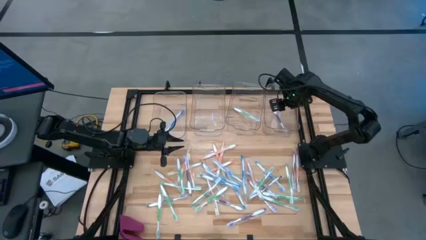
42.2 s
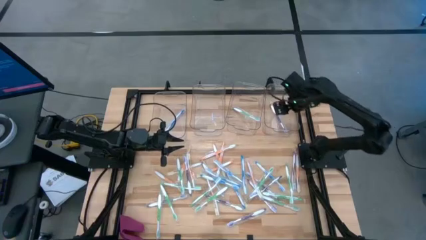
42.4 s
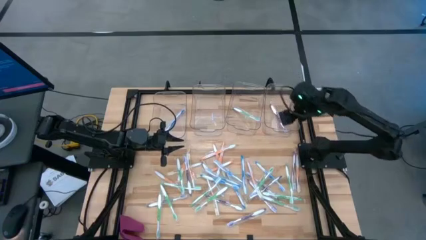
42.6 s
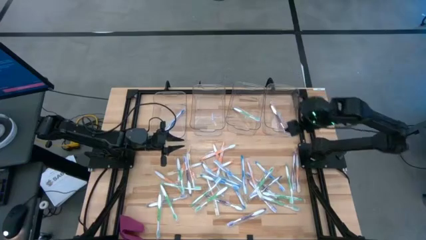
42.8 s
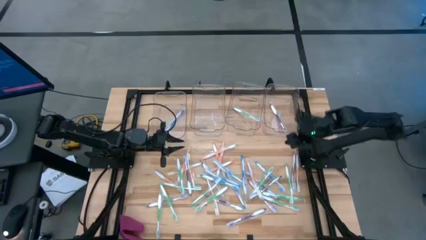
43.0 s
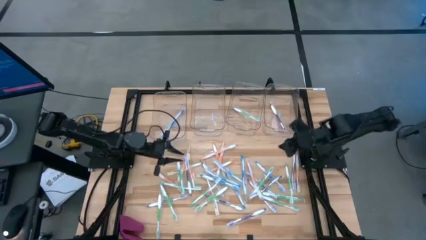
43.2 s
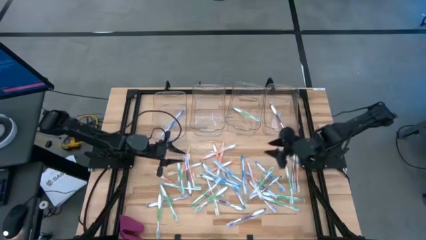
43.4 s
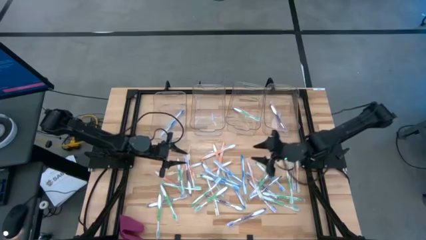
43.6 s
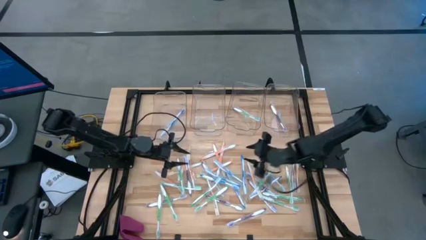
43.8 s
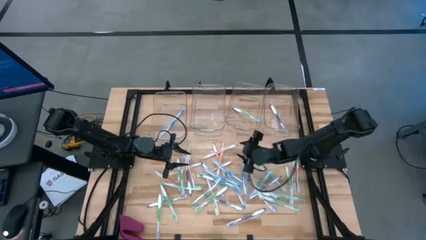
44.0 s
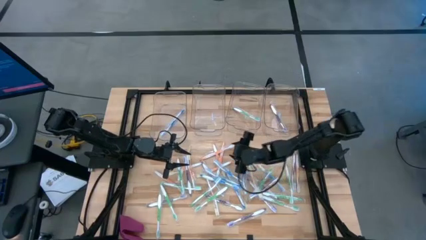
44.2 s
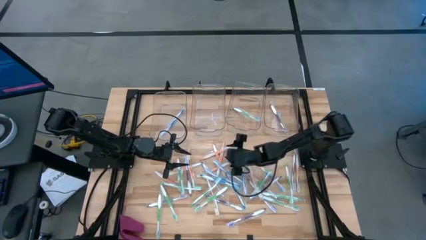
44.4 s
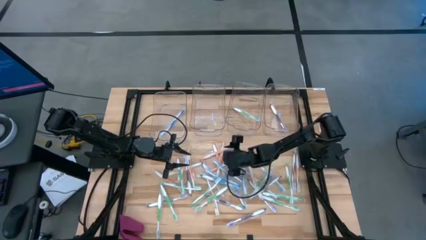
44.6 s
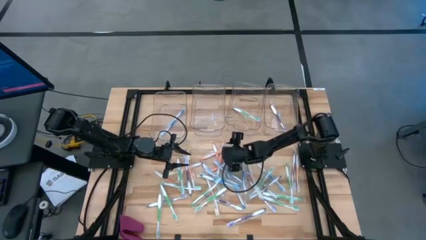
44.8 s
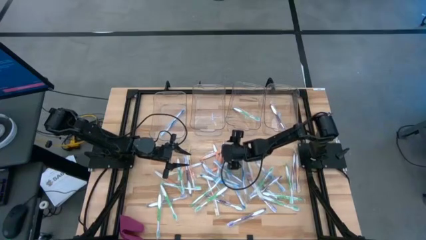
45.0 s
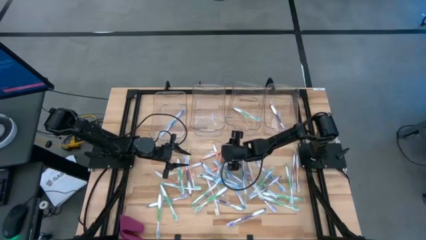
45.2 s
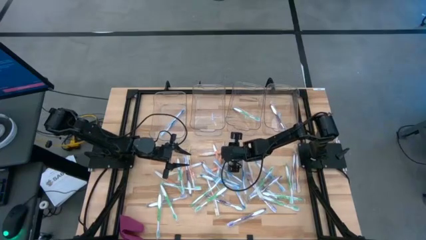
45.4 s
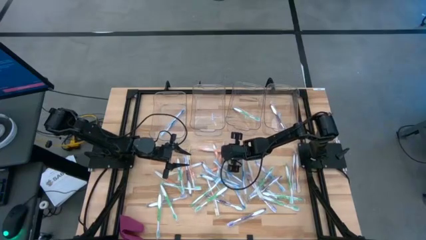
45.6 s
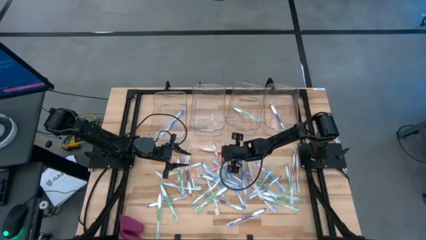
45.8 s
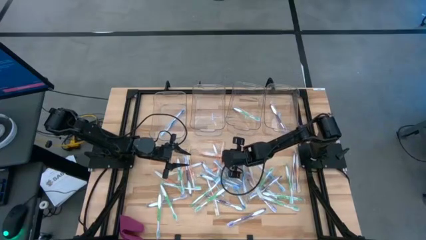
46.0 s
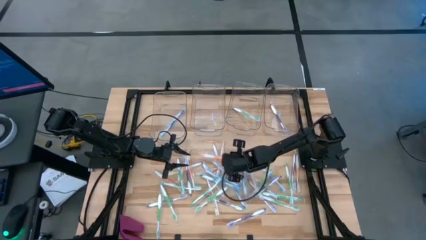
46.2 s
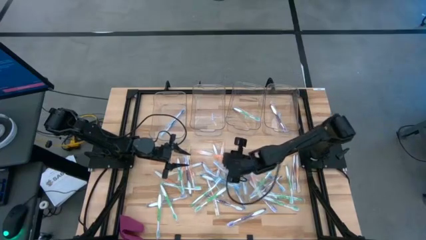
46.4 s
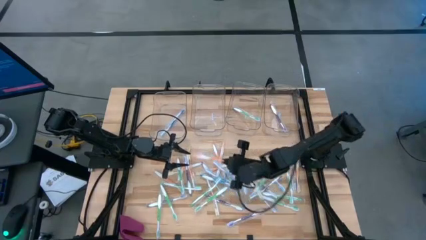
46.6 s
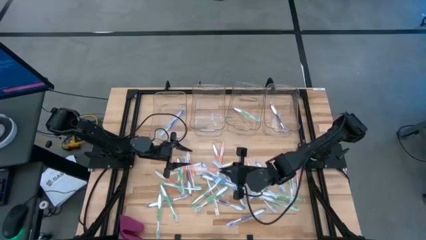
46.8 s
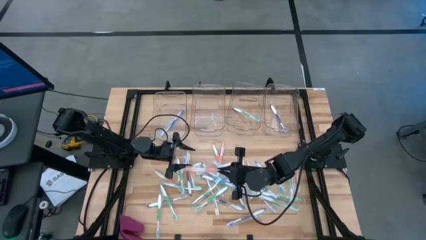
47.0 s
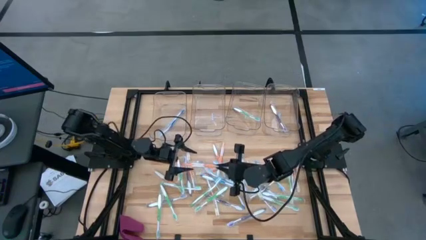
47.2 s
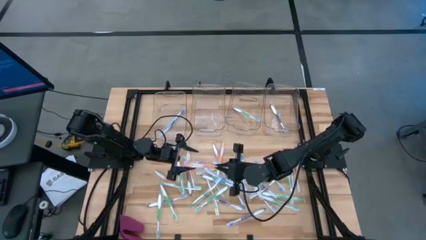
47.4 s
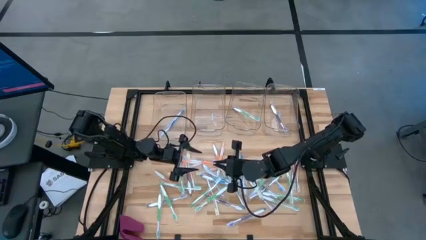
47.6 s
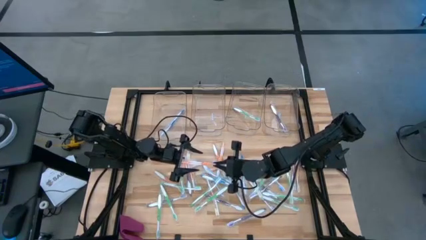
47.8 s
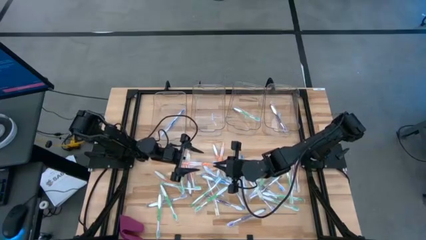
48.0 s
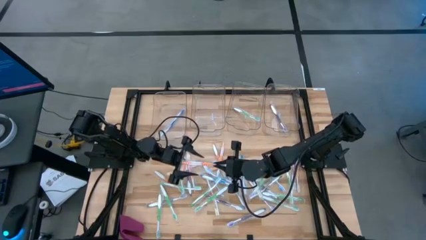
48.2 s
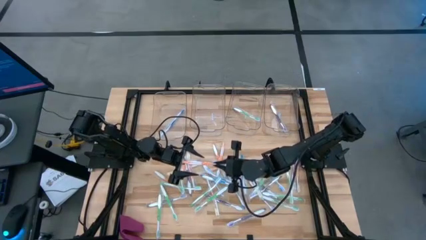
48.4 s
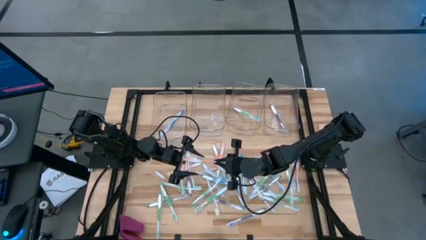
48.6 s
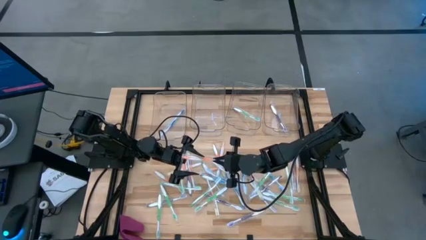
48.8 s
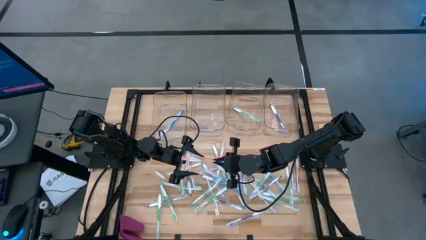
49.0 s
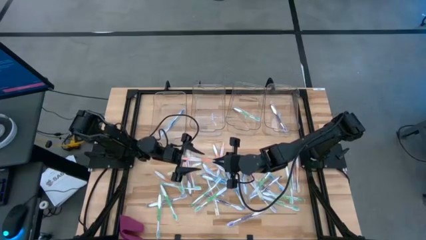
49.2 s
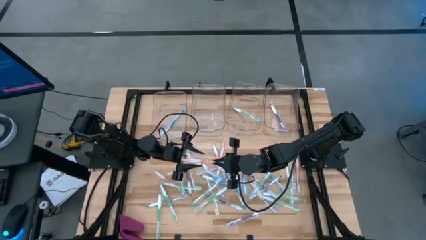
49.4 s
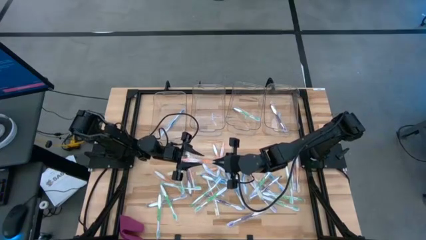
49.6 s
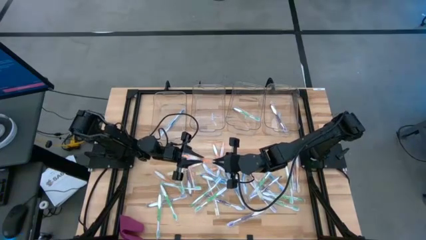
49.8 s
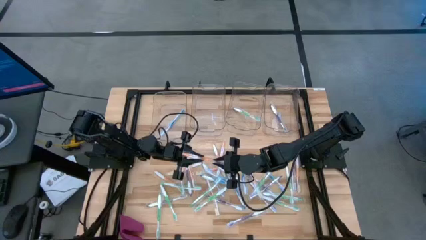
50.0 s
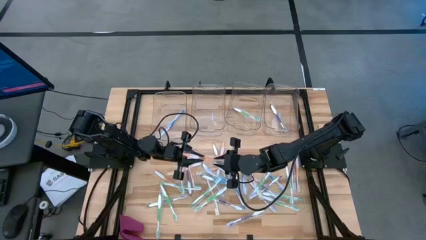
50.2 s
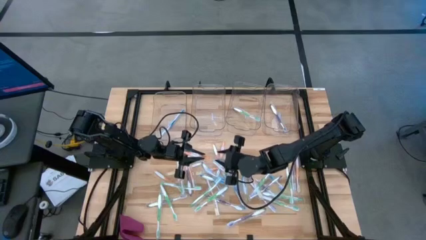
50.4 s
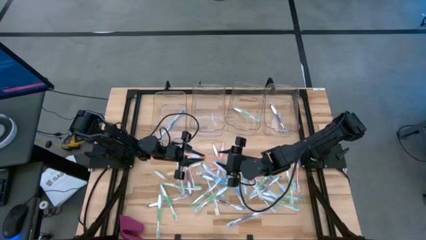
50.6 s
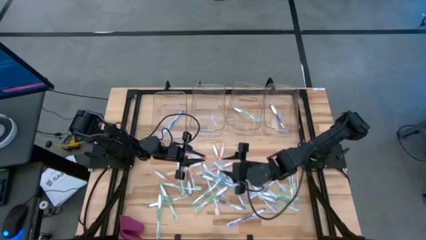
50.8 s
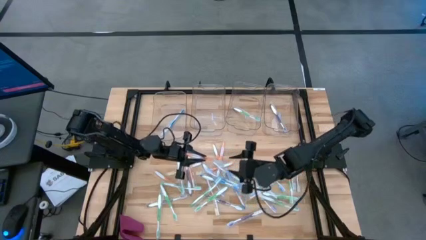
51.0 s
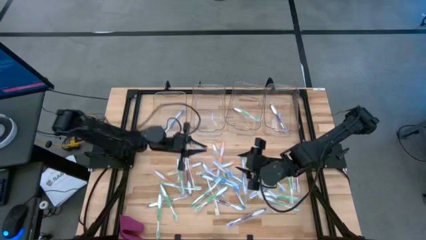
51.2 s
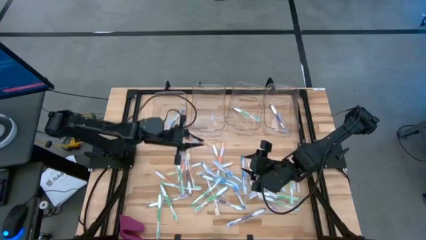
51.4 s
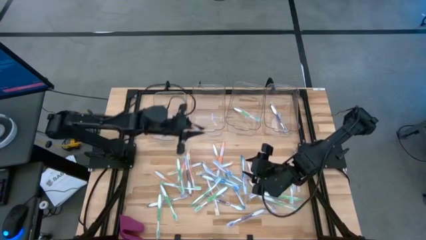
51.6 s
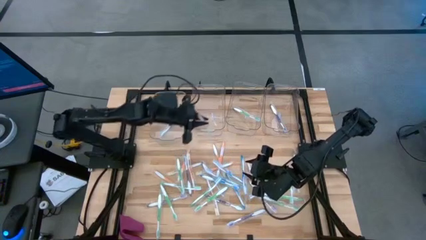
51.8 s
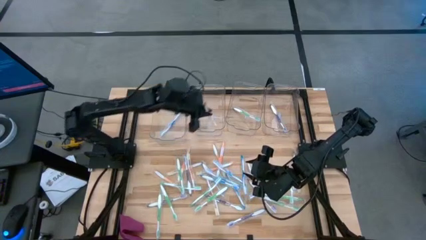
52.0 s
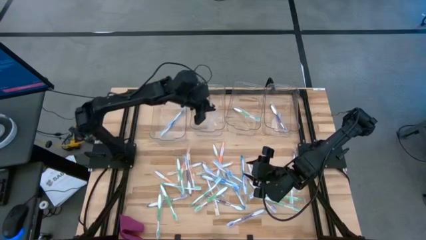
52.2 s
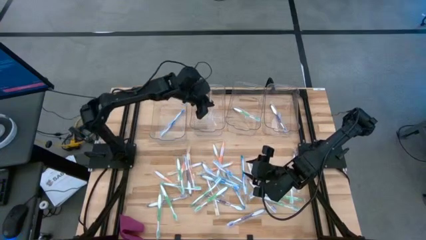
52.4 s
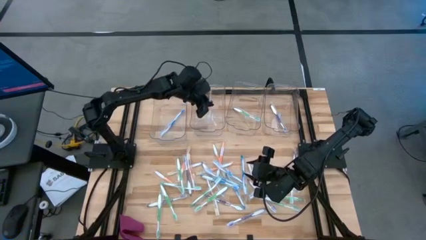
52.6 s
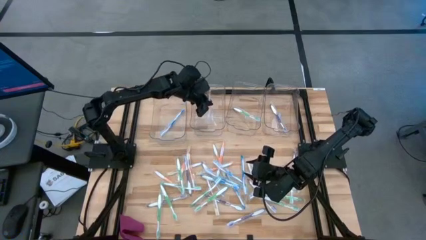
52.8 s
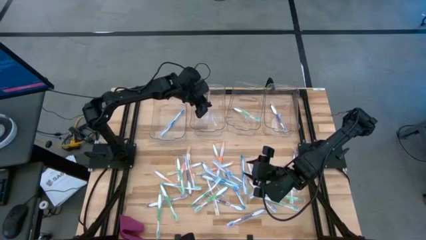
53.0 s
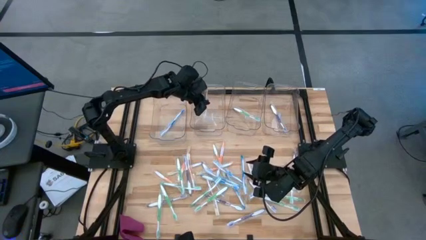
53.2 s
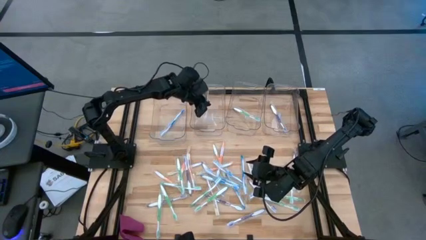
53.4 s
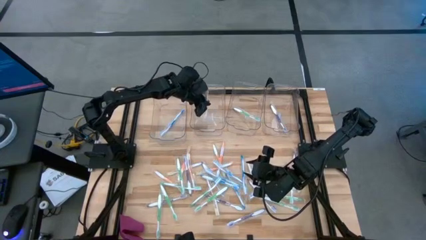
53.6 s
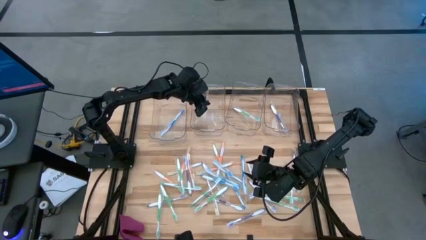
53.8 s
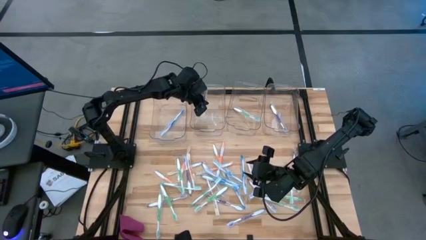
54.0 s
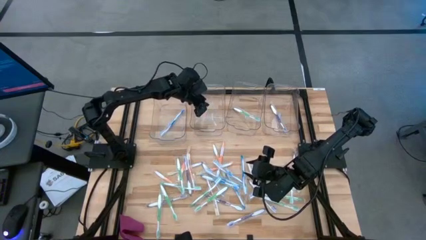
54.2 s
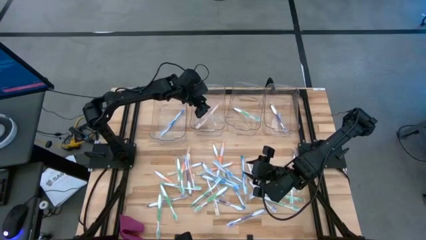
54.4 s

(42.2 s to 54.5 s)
Task: Pick & Place Toothbrushes
Put the orange toothbrush into the middle left transparent bin

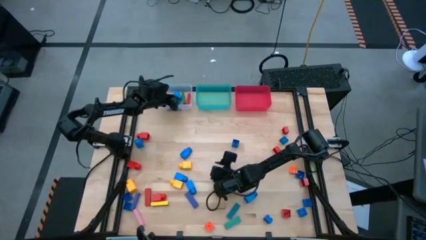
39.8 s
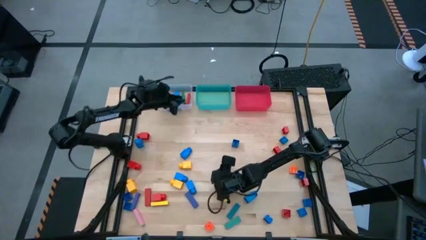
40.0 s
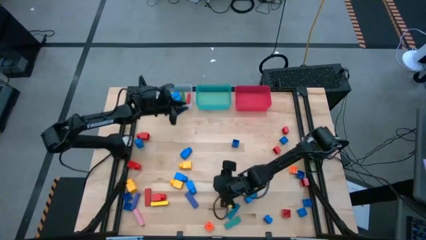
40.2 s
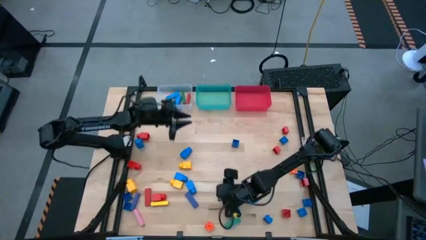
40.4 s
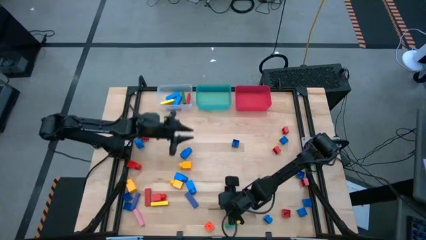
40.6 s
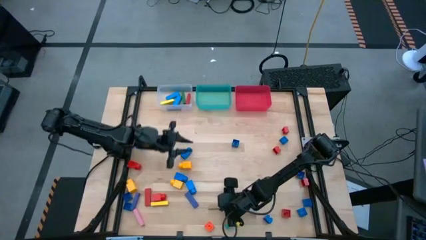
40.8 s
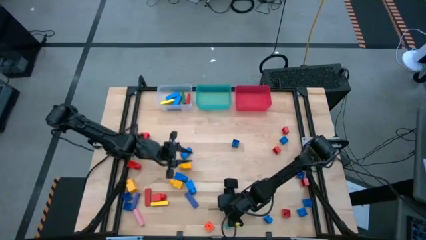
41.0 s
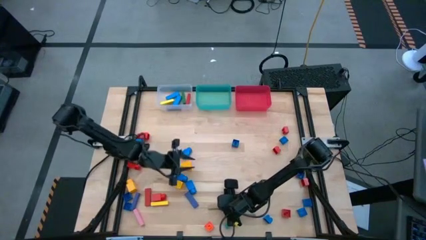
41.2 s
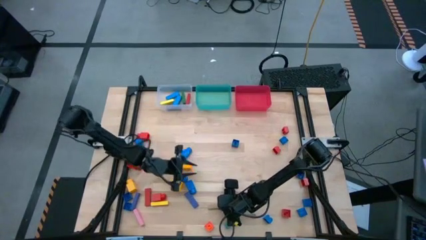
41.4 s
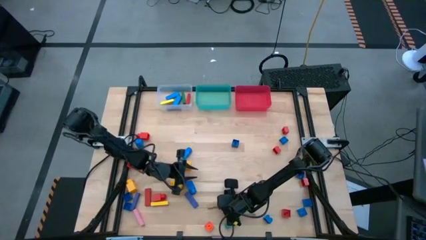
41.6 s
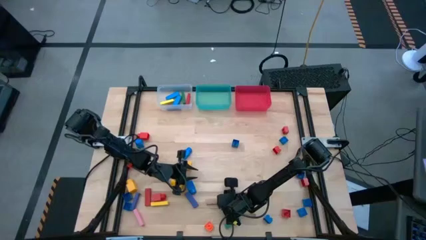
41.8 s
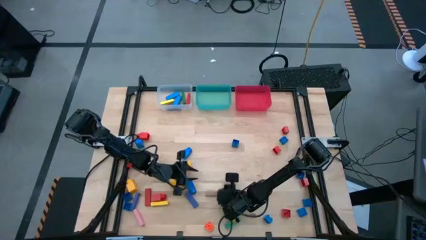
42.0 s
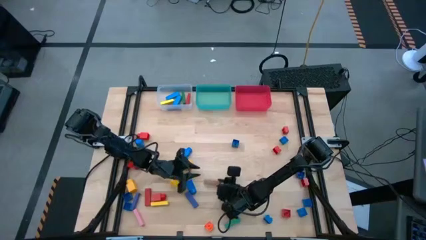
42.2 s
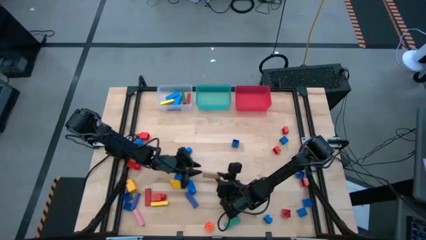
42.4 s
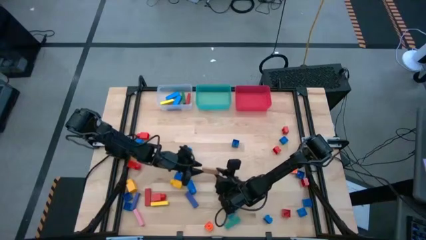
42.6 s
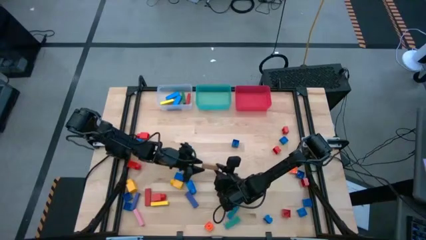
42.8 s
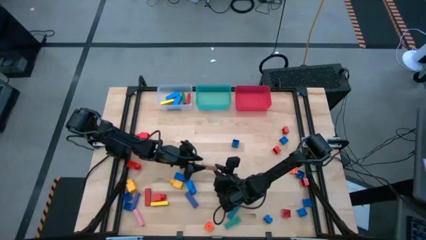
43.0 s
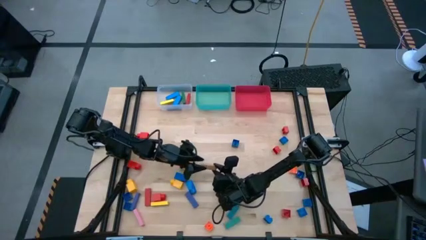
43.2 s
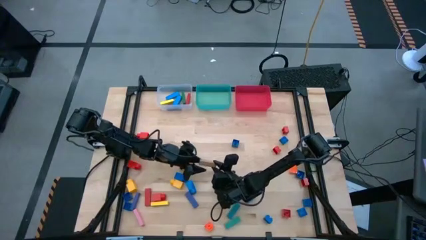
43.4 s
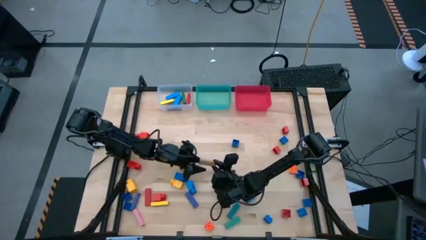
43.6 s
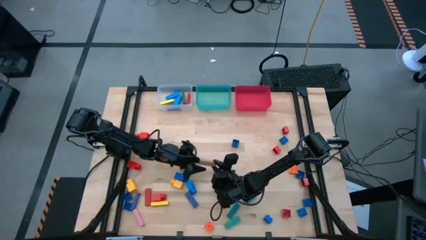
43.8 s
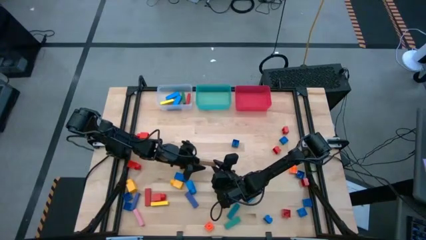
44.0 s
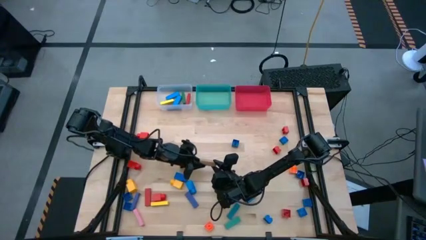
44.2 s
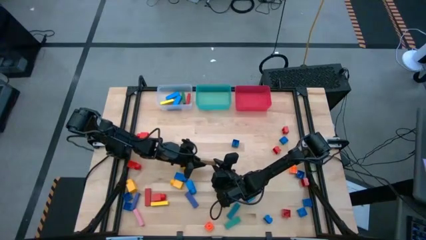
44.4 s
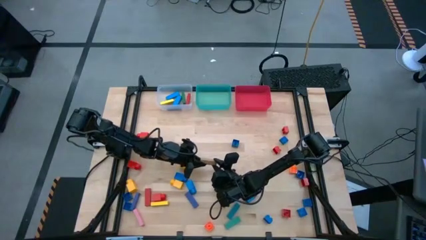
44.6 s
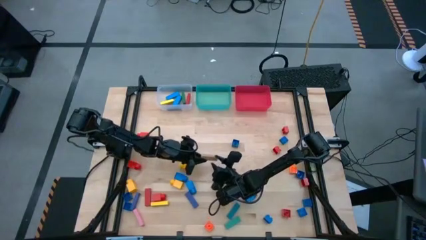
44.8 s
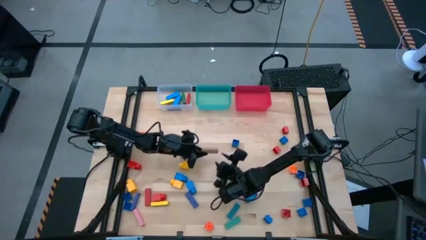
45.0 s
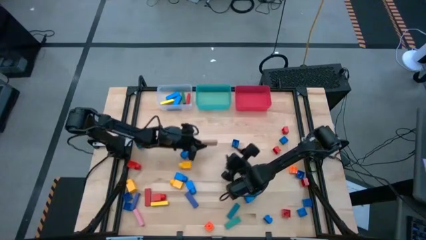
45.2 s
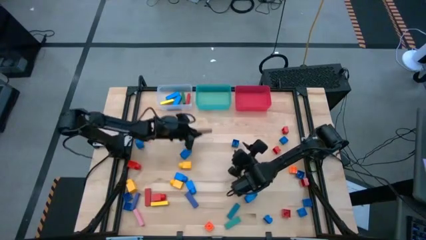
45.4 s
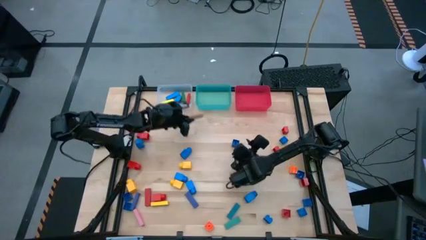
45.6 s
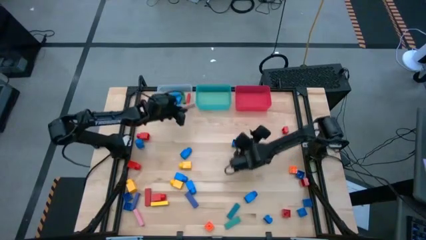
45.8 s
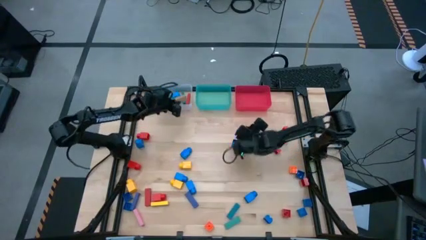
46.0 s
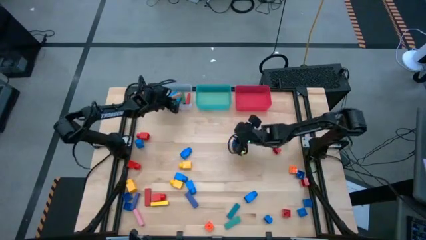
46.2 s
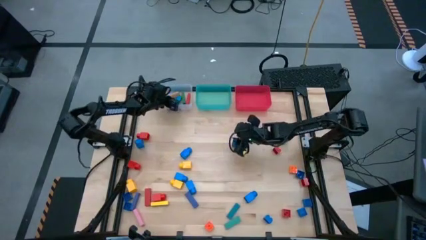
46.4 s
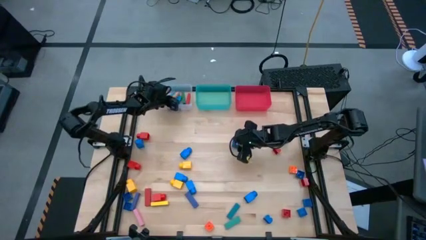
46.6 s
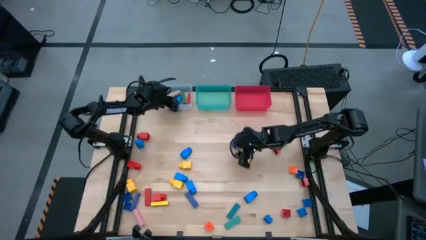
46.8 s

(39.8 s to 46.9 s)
Task: Sort blocks by size
Put the brown block into the transparent bin
